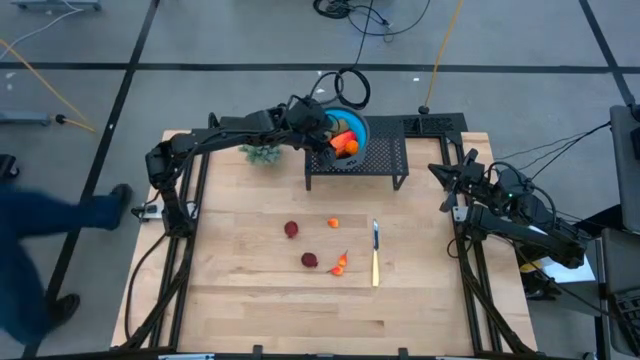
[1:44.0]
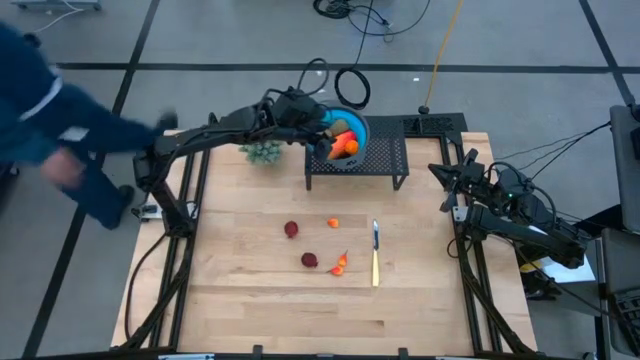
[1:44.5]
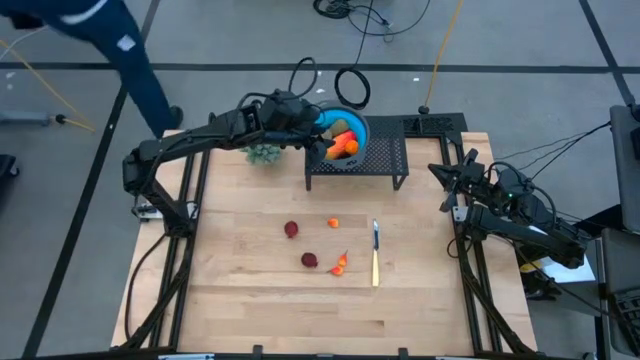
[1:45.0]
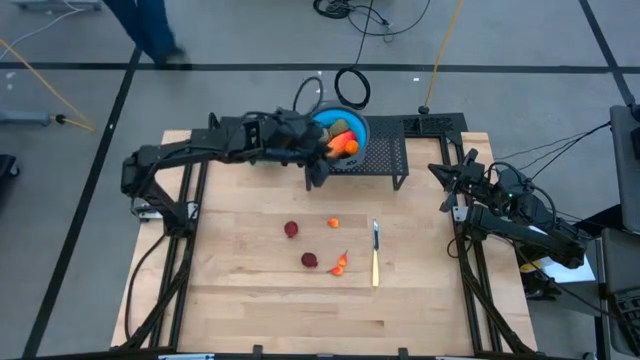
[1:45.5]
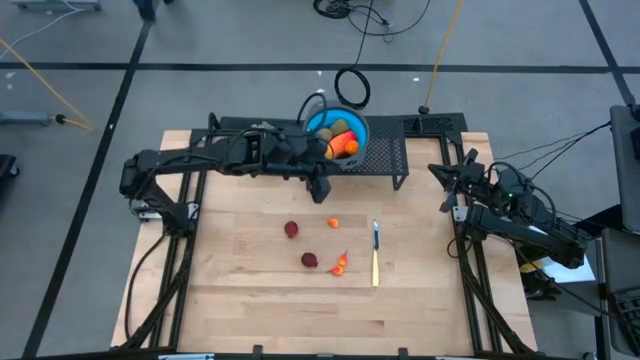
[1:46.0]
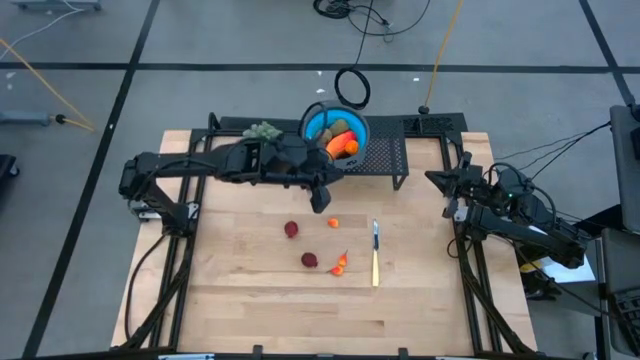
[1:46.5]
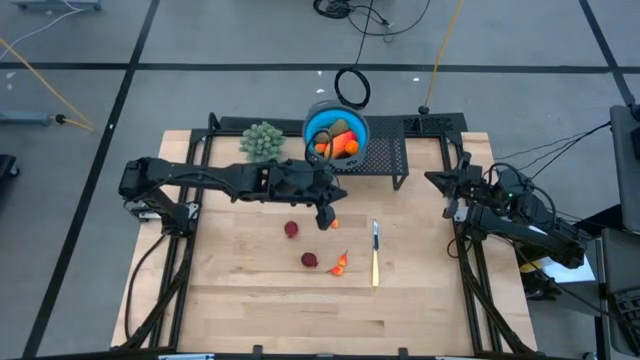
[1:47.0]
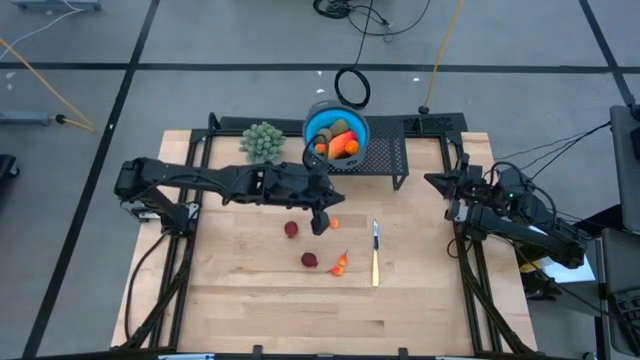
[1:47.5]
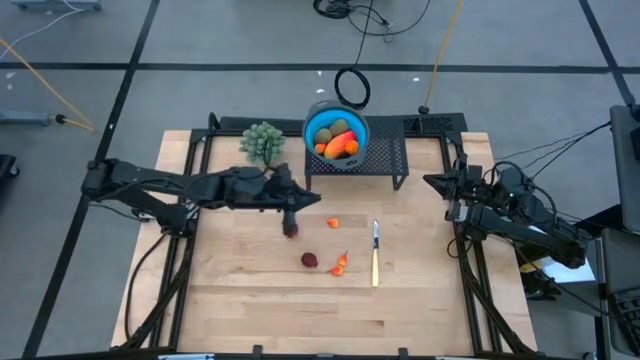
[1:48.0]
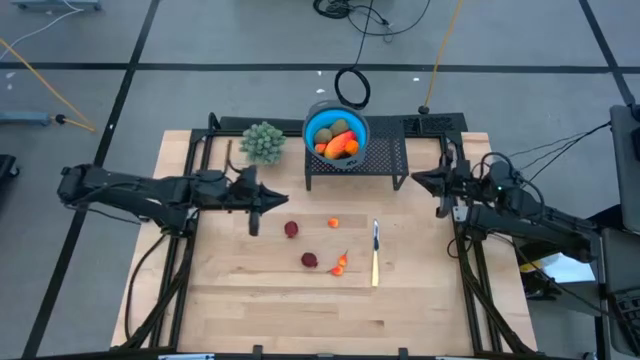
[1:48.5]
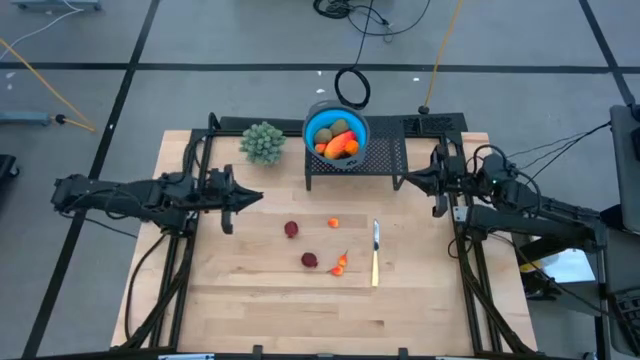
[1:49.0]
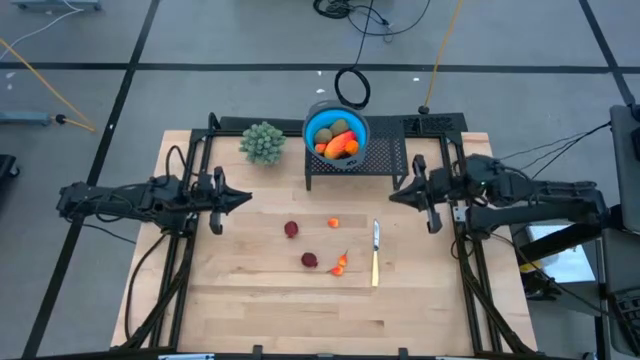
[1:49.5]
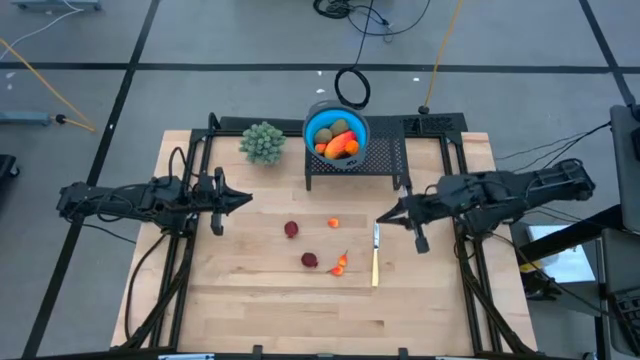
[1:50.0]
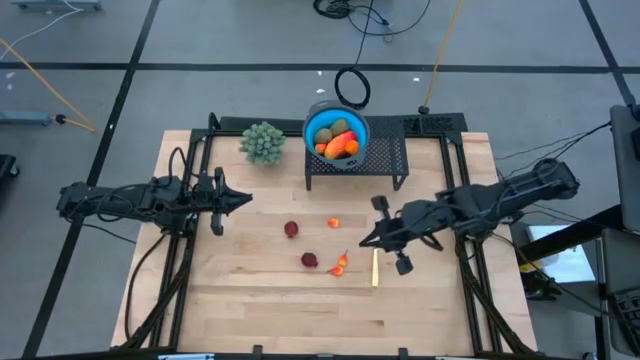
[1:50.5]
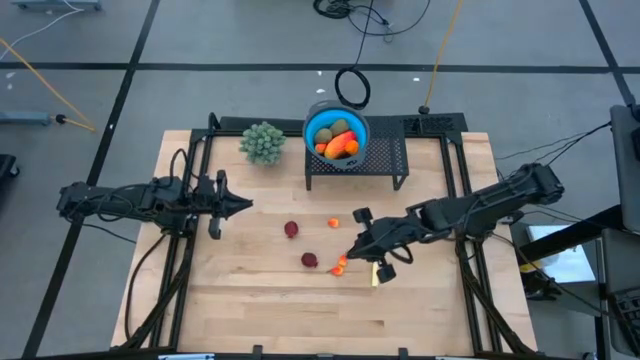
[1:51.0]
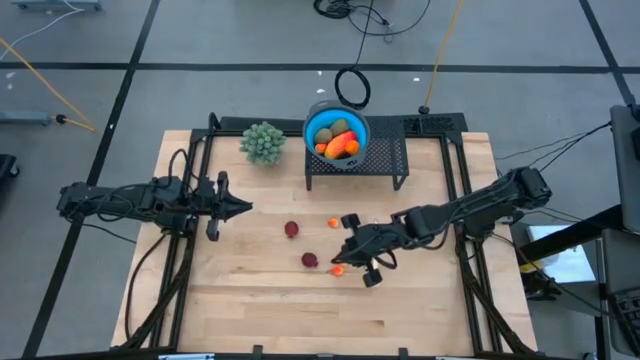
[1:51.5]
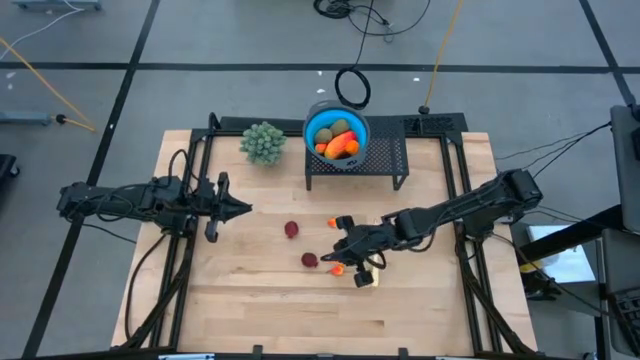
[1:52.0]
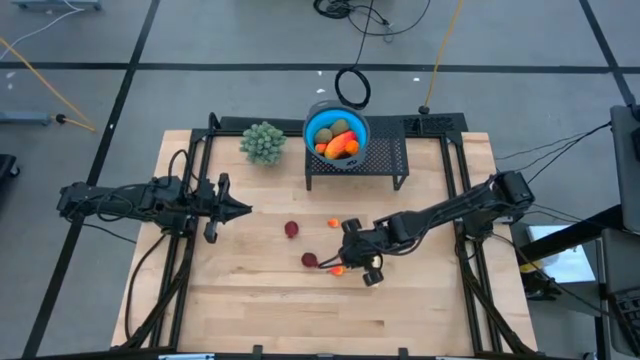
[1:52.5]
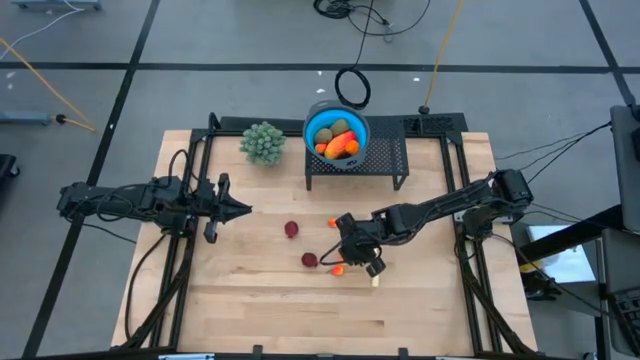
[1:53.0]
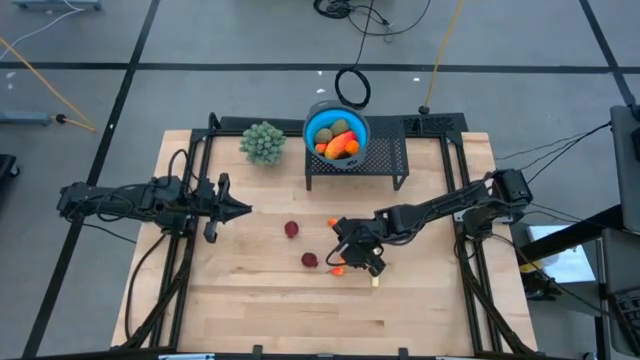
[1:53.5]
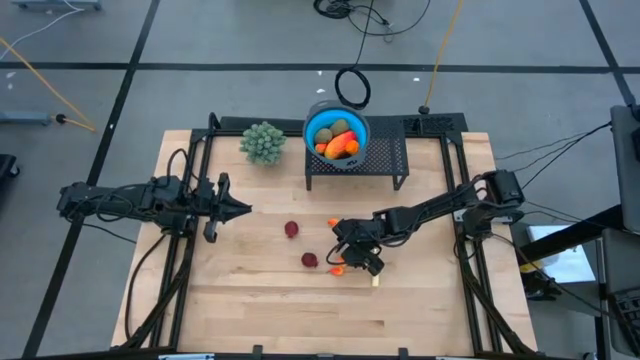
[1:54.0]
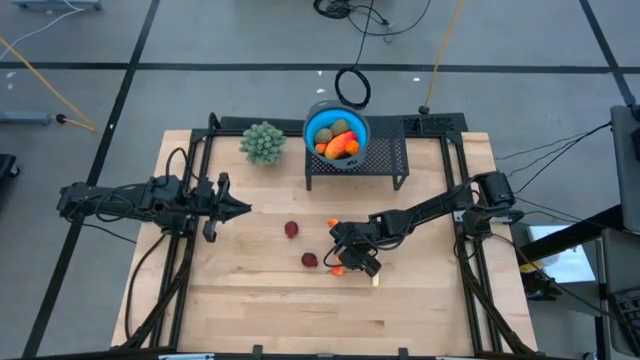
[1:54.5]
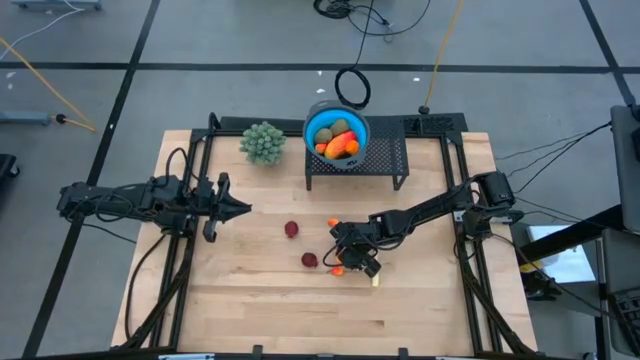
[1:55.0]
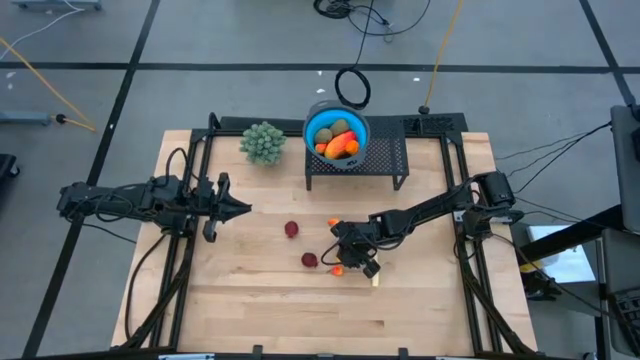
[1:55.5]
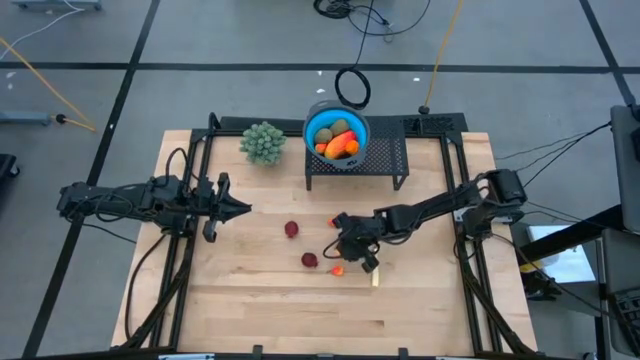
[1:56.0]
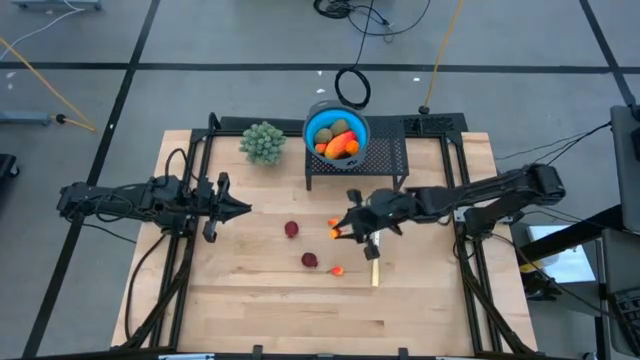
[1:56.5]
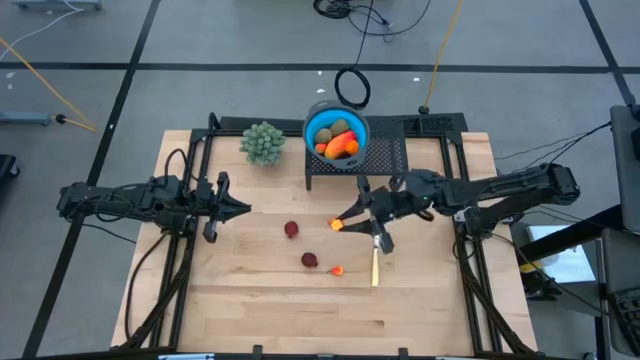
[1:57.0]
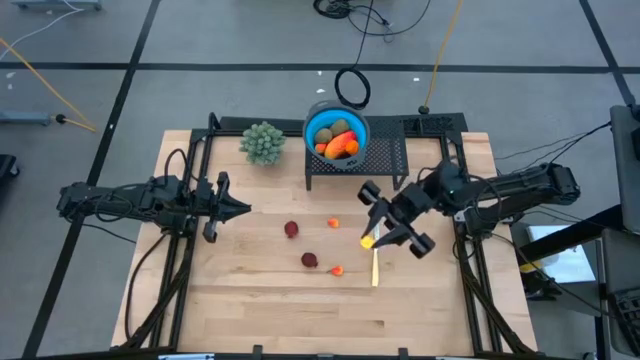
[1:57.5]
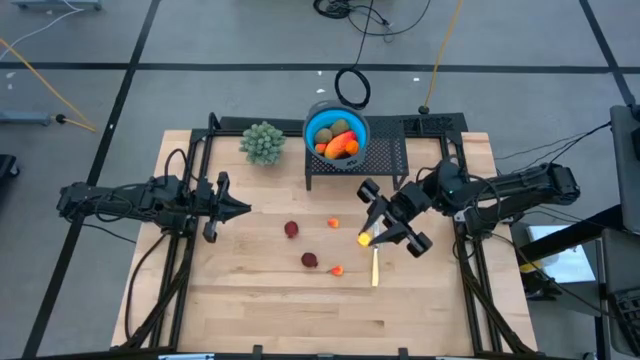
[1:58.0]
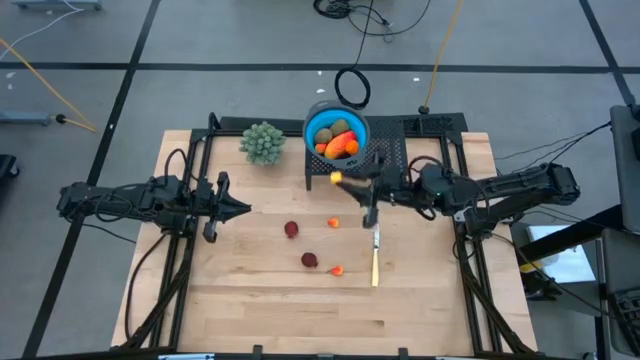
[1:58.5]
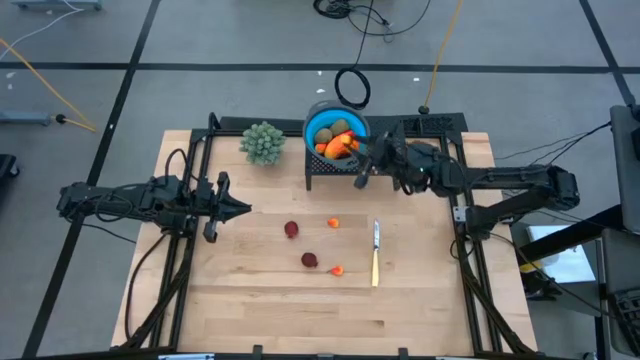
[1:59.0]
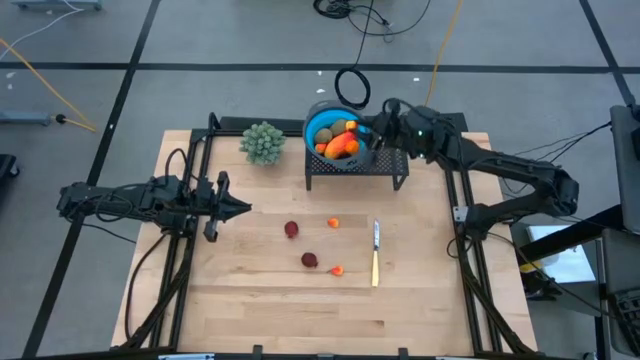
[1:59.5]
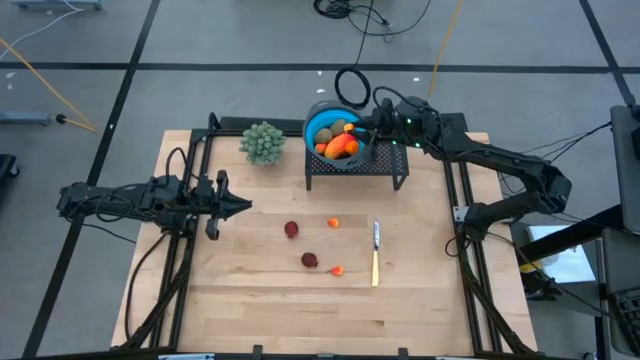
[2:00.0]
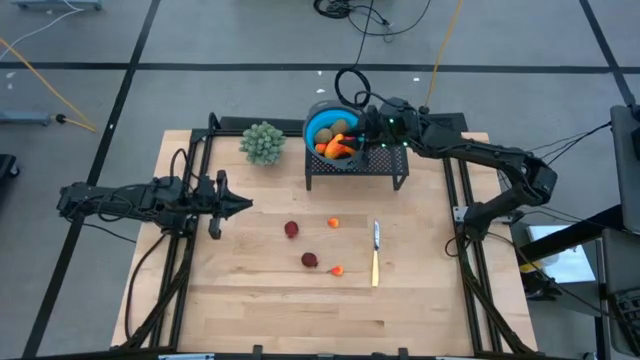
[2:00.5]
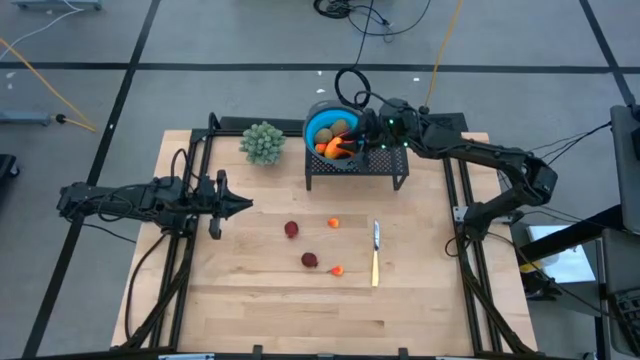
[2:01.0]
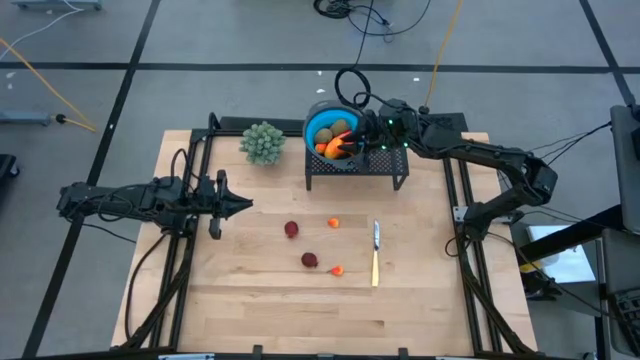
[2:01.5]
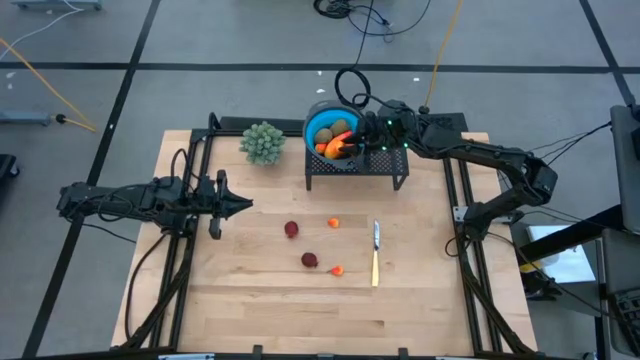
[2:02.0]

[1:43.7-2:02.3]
Task: Pick & Place Fruit
Put the orange peach into the blue strainer bowl on the shelf

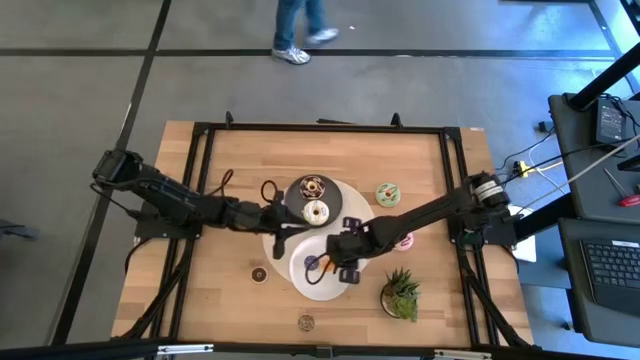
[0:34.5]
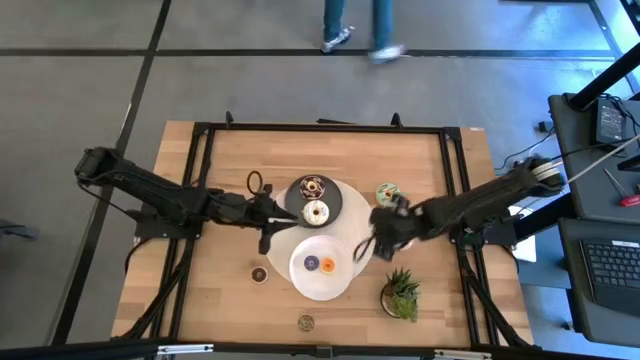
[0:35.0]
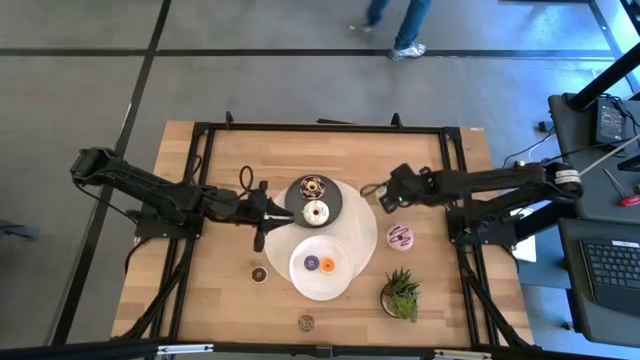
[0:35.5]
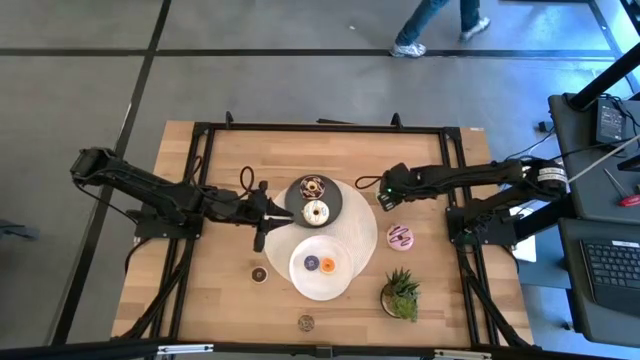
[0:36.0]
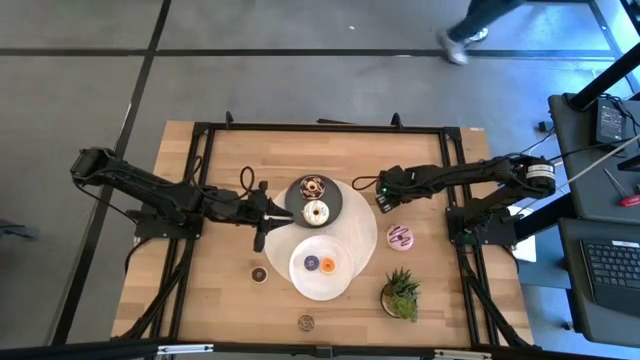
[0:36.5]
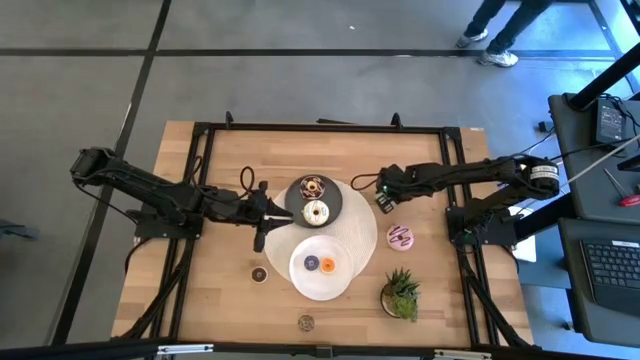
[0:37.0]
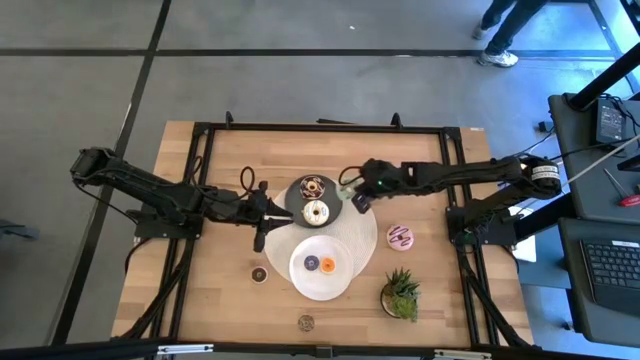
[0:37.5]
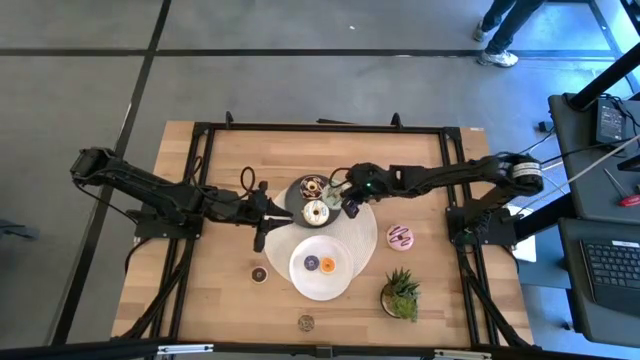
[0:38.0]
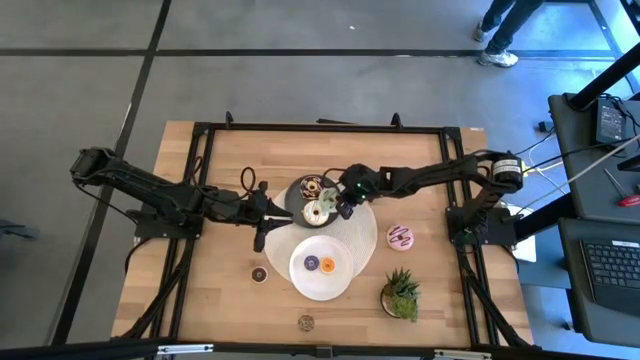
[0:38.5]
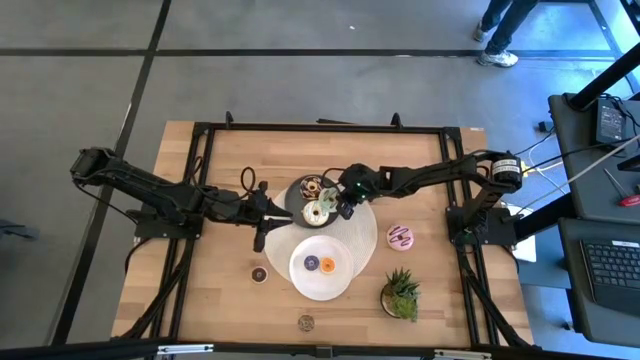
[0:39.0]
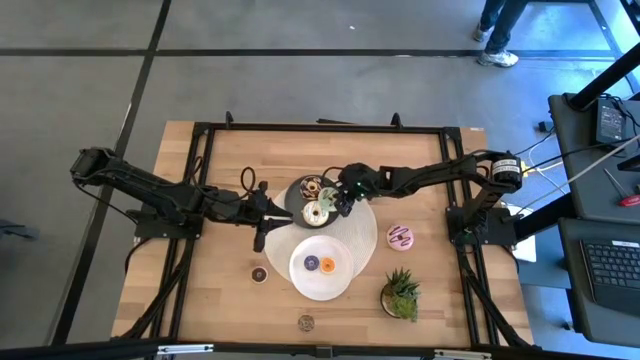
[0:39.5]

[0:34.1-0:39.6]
Task: Pick & Place donuts
Put the big green donut on the gray plate
